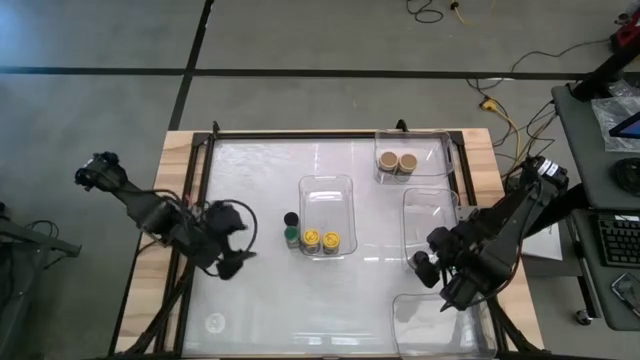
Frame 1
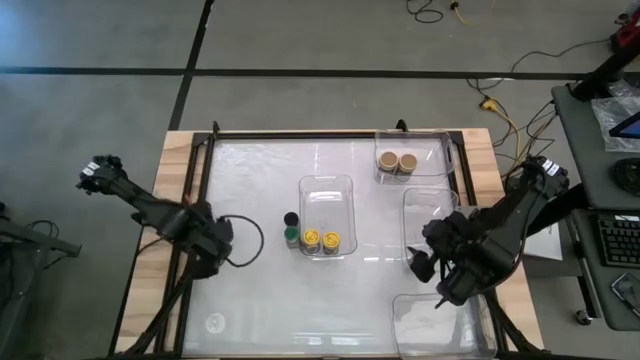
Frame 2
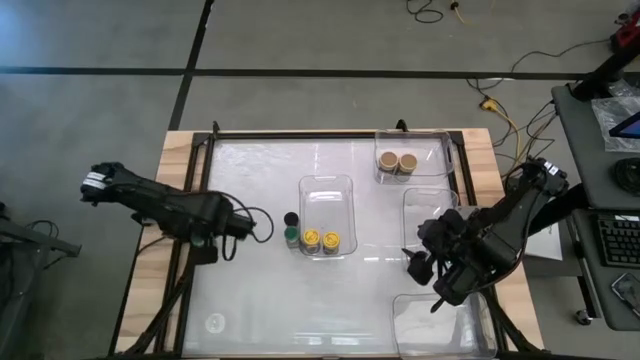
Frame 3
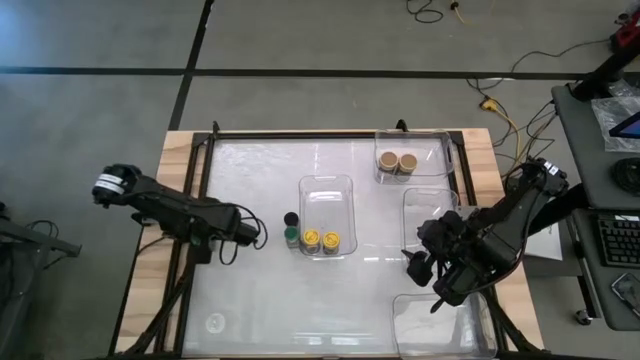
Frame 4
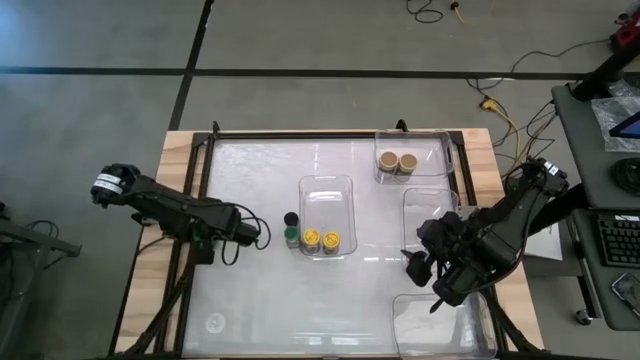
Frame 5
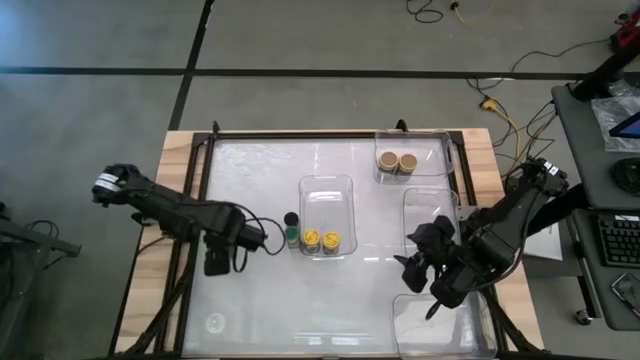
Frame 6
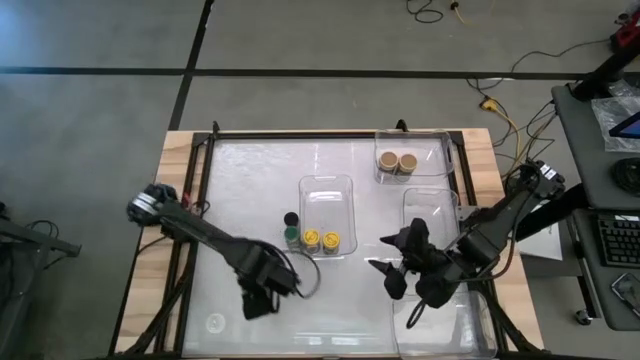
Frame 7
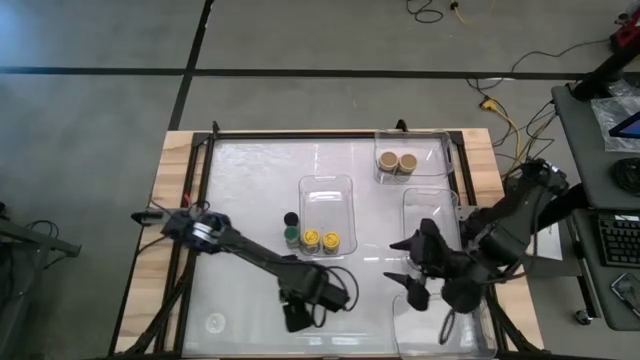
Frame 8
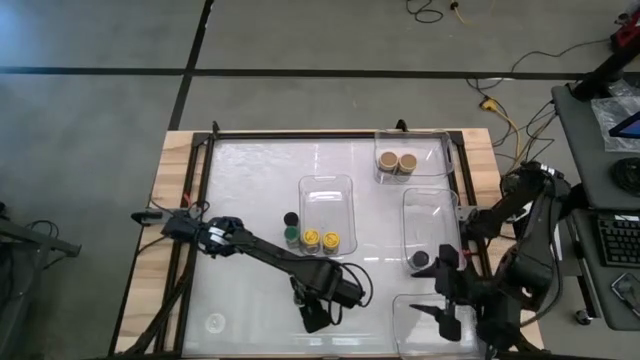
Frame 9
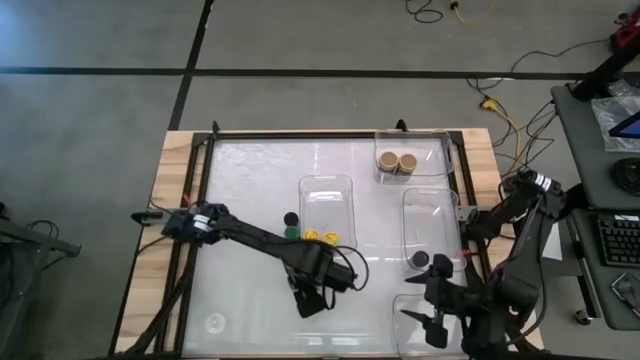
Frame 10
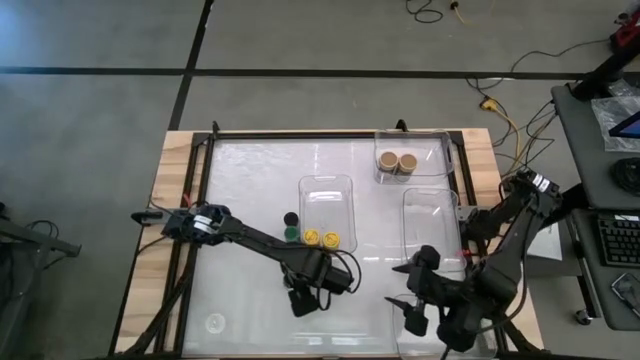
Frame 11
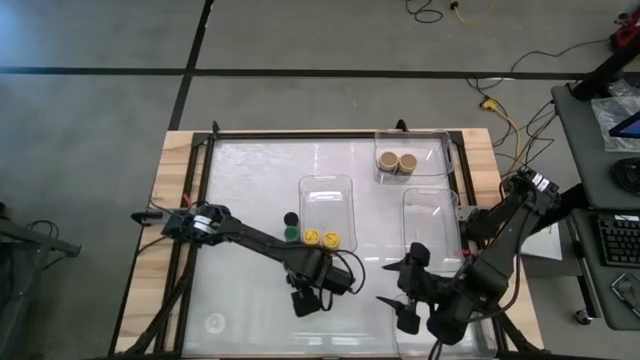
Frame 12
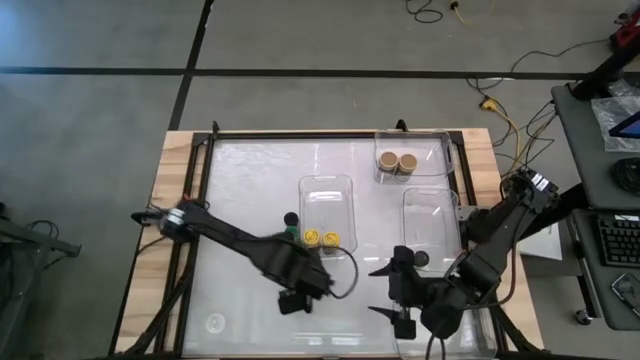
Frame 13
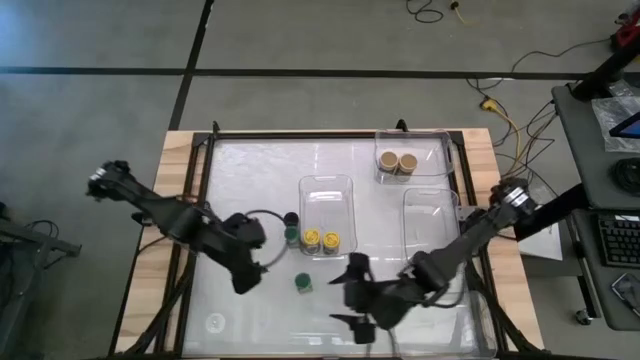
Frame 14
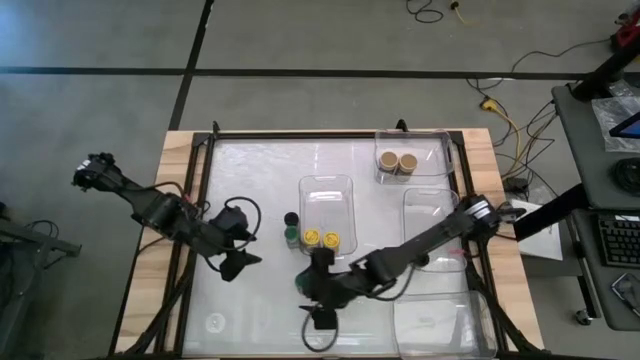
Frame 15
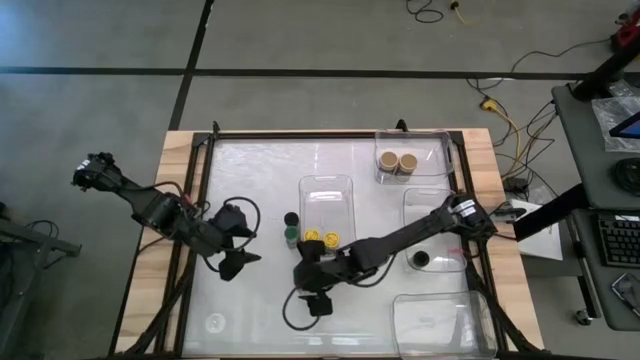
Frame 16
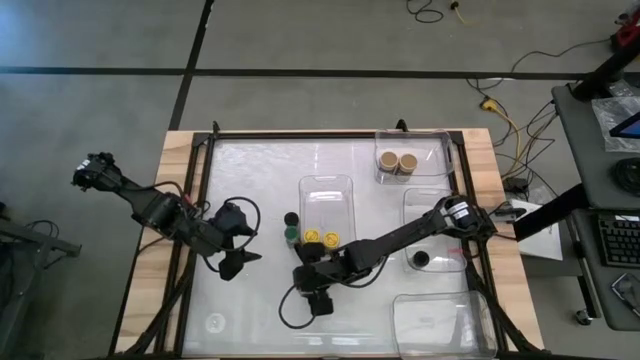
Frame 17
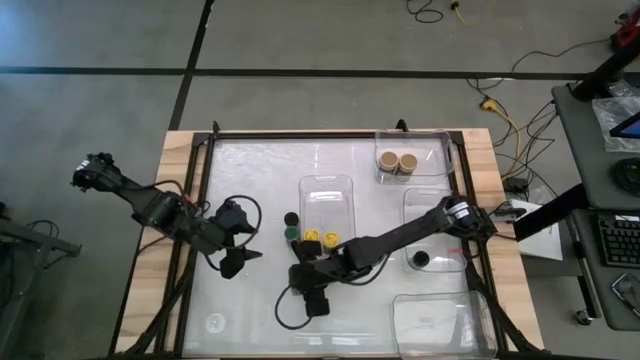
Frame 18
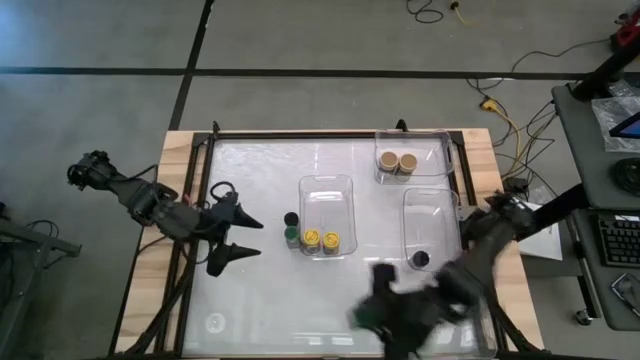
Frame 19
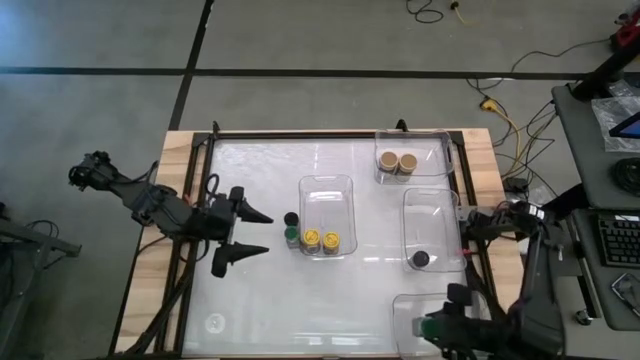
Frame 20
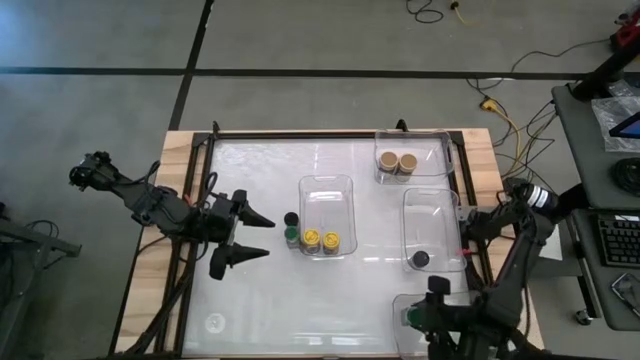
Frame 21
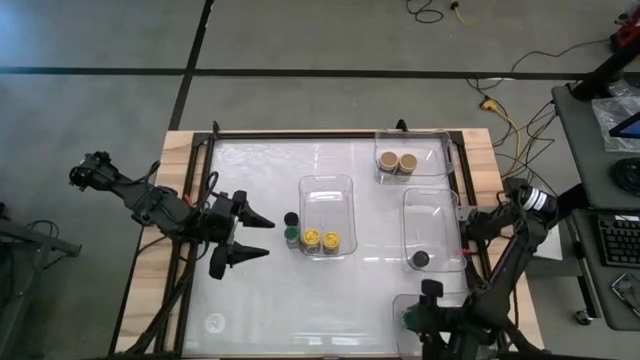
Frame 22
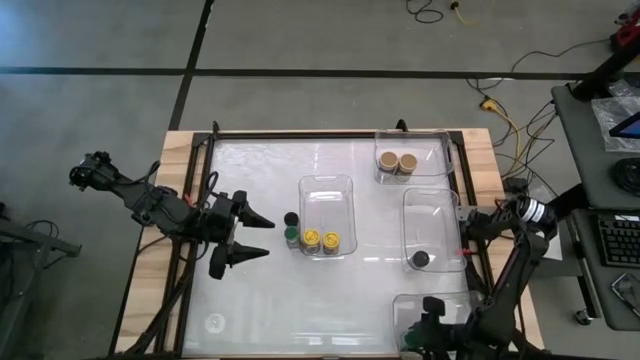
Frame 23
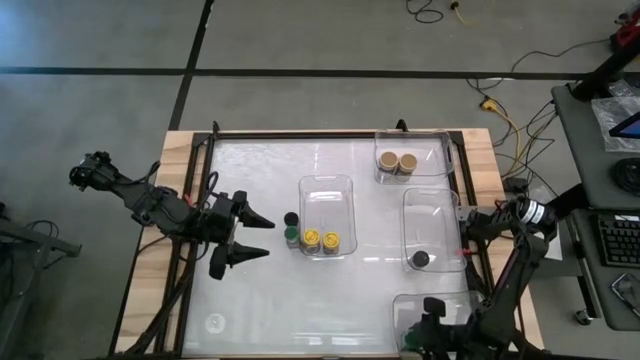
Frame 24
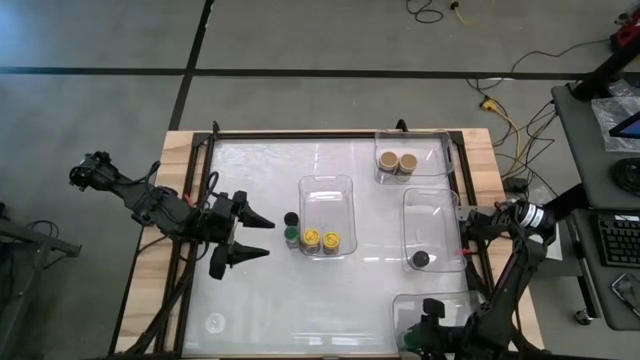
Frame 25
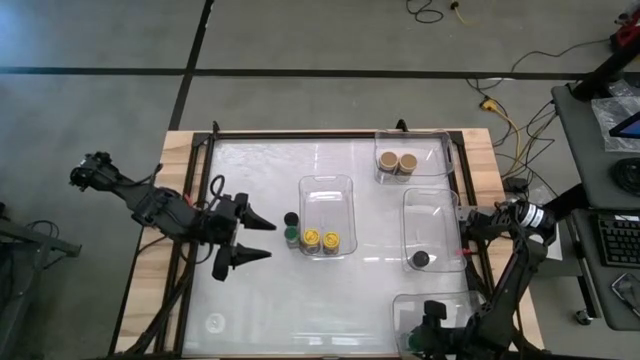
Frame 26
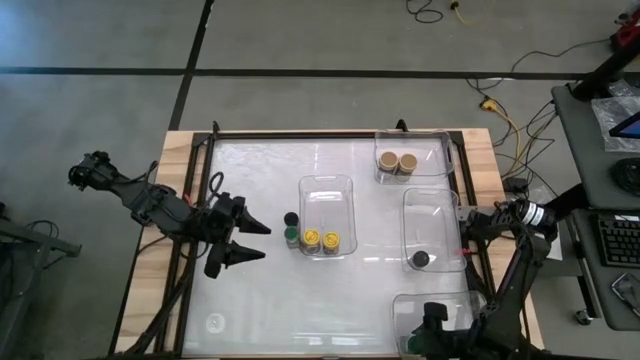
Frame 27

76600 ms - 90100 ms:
Task: Sort spices by type
Put the left green seasoning bottle into the bottom transparent bin
